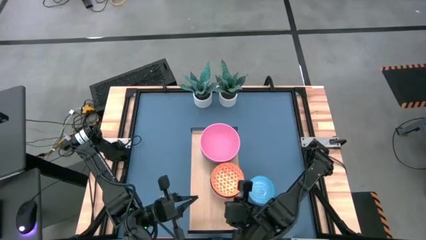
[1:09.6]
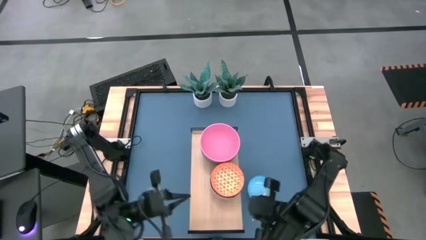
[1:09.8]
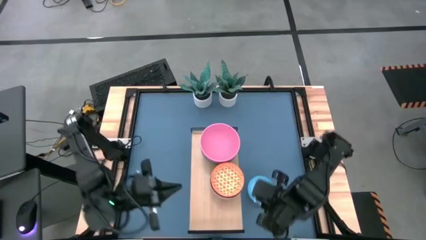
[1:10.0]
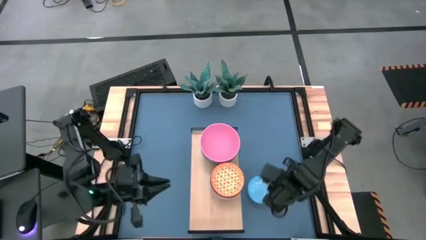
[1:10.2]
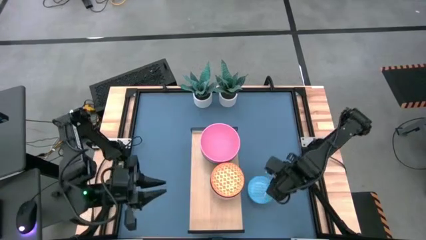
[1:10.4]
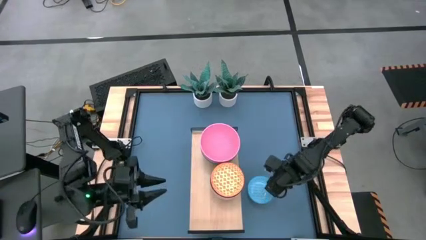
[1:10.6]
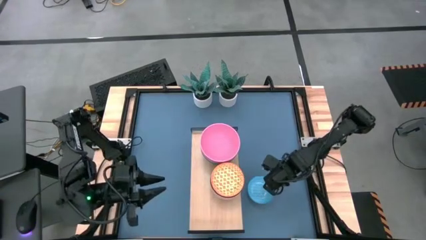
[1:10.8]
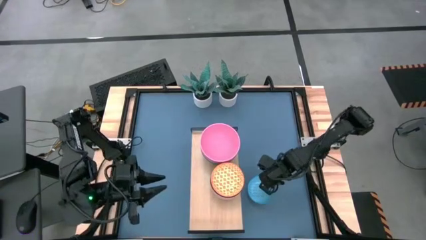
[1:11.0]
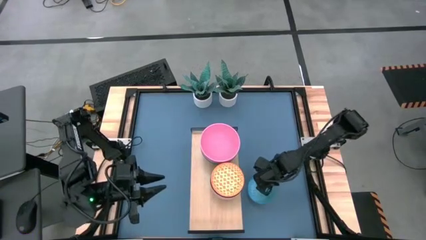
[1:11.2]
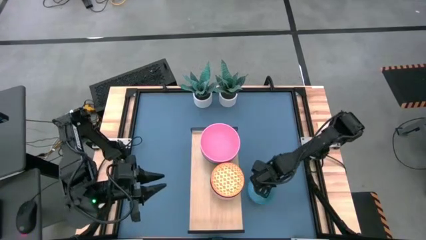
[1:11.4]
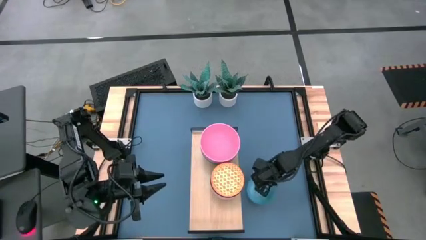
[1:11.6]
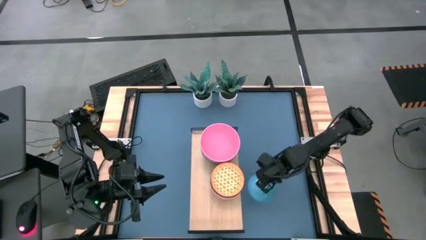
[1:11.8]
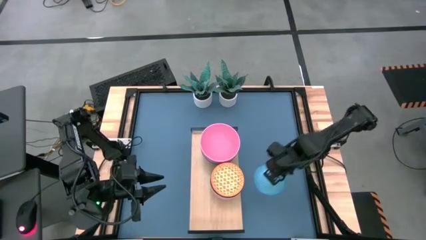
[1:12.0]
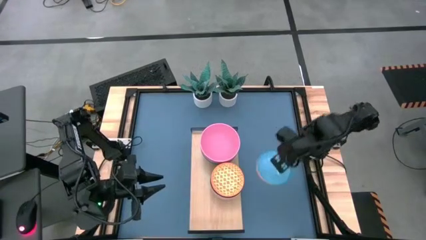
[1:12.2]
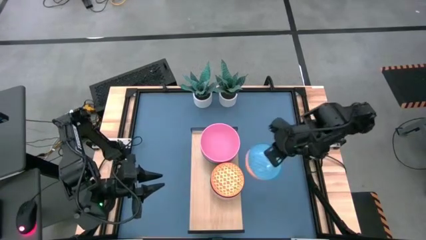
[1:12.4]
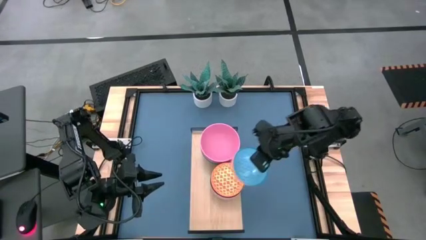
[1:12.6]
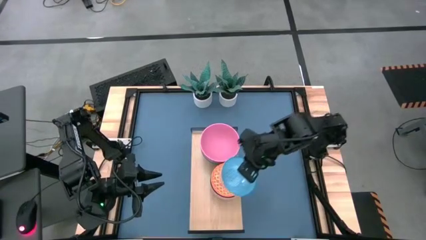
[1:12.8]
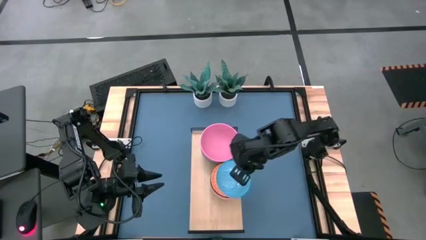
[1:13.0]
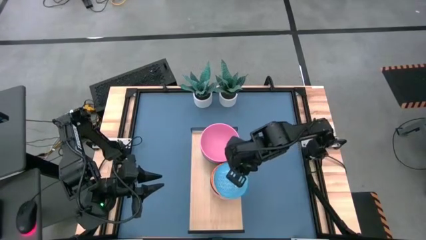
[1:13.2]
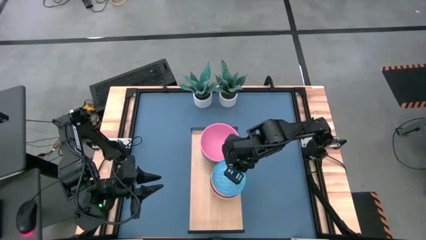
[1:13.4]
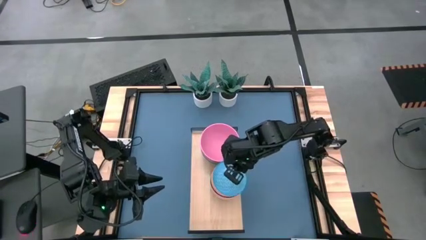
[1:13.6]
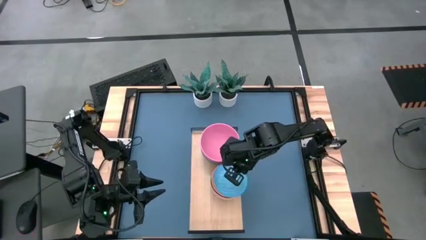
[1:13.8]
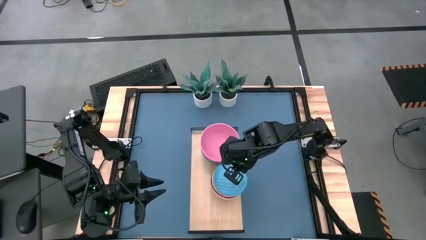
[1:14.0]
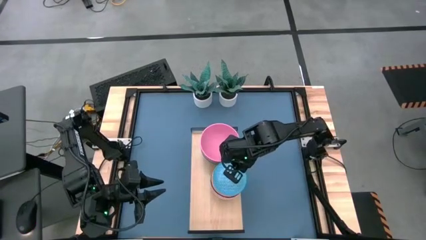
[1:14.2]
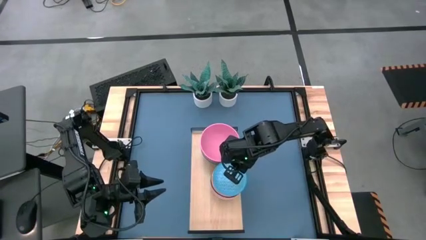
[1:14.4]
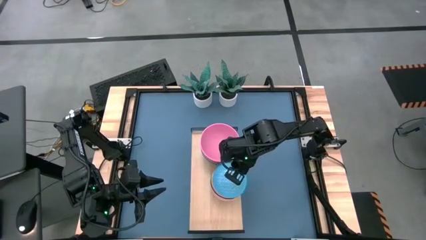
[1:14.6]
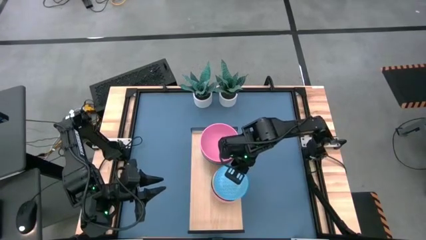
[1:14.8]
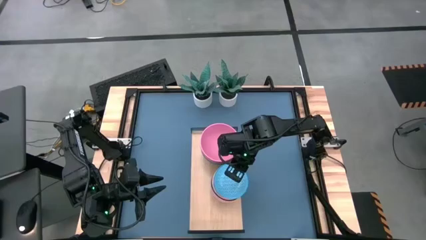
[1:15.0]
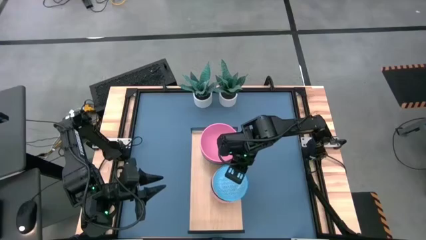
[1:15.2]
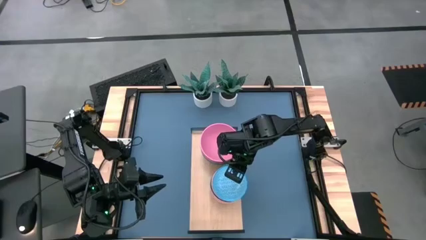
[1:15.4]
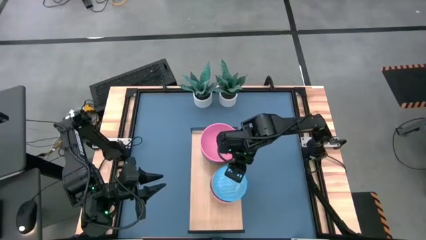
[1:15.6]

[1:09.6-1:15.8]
Task: Place and stack bowls onto a shelf
Stack the light blue patterned bowl on top of the orange patterned bowl on the shelf

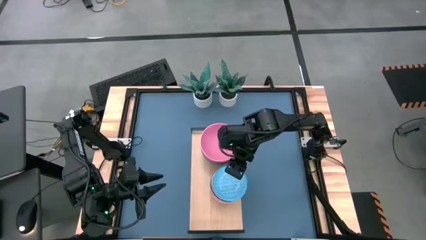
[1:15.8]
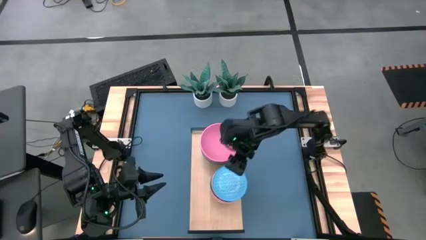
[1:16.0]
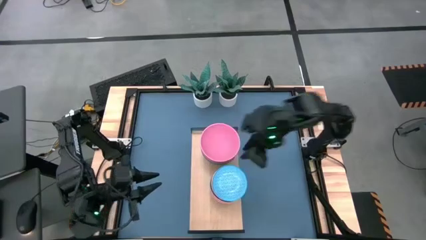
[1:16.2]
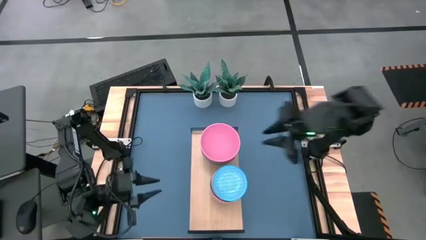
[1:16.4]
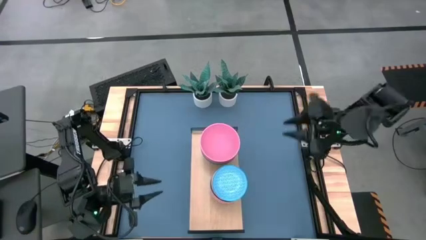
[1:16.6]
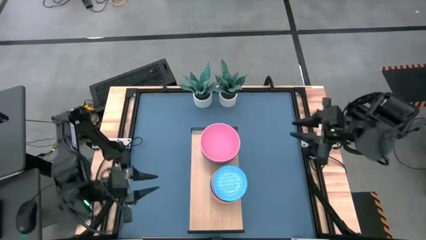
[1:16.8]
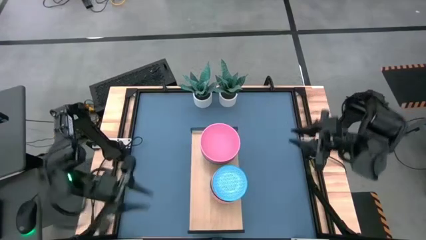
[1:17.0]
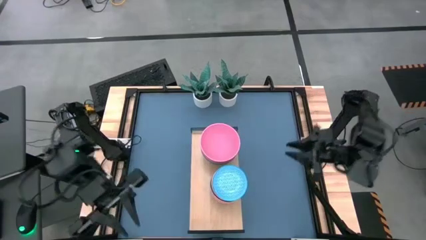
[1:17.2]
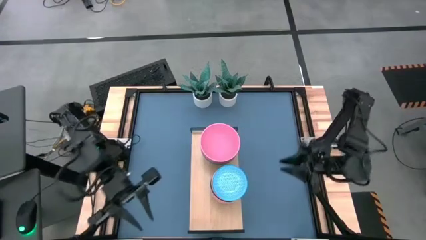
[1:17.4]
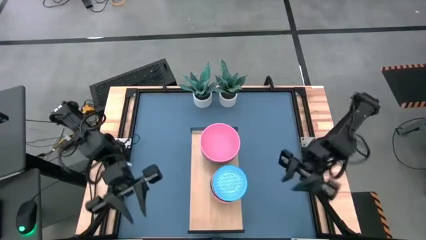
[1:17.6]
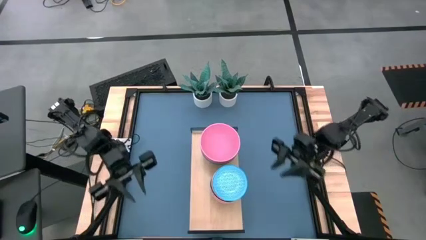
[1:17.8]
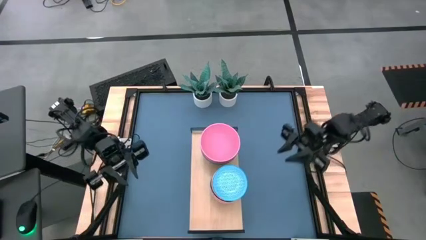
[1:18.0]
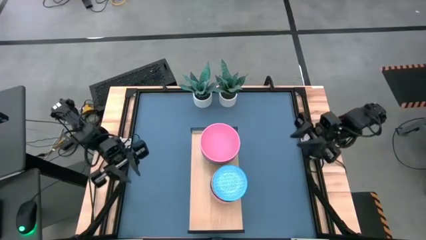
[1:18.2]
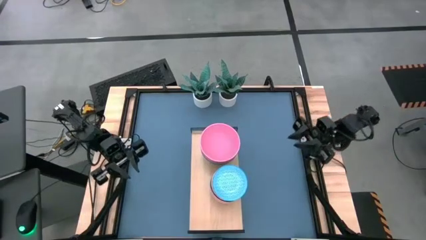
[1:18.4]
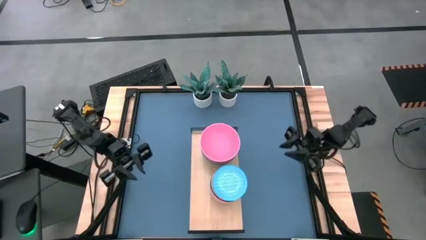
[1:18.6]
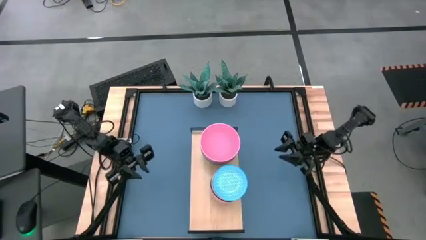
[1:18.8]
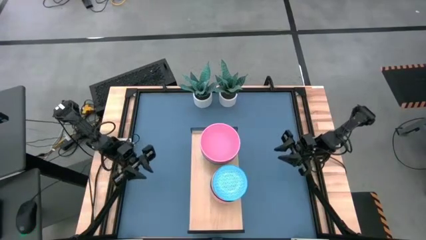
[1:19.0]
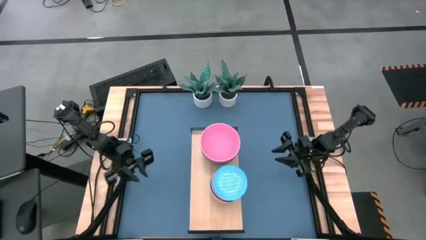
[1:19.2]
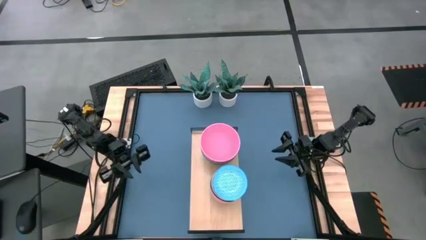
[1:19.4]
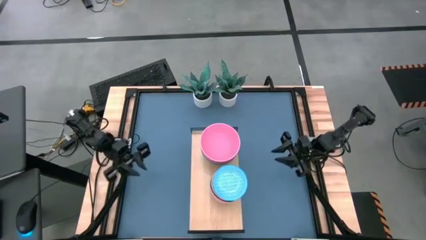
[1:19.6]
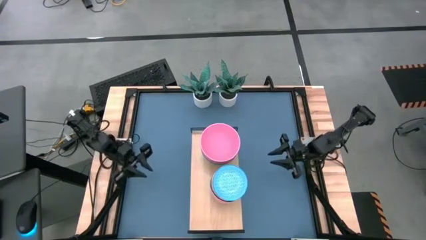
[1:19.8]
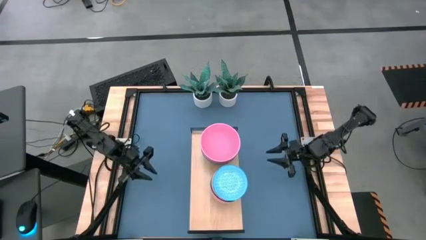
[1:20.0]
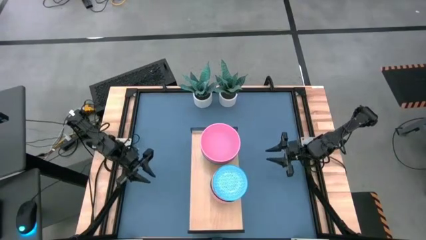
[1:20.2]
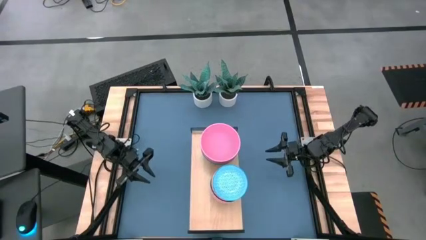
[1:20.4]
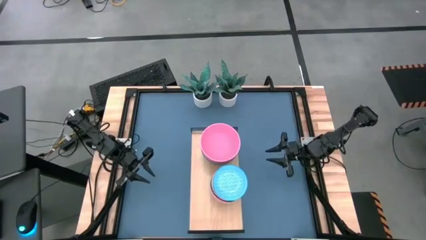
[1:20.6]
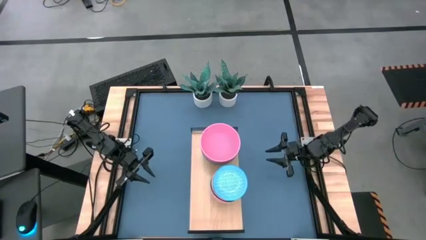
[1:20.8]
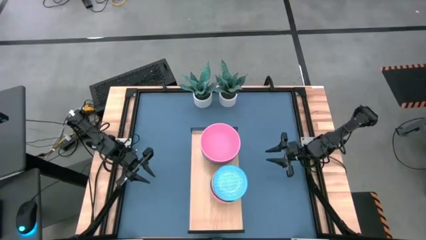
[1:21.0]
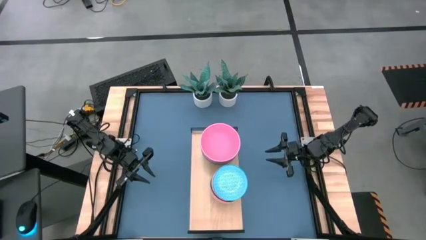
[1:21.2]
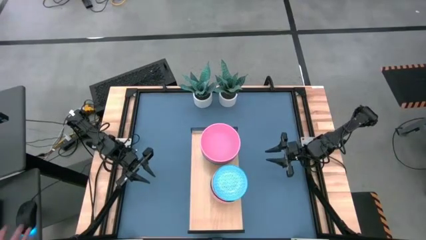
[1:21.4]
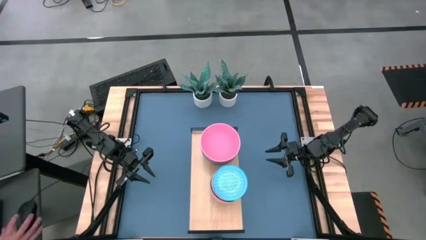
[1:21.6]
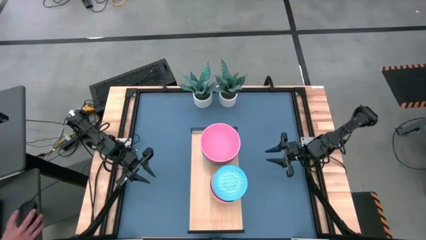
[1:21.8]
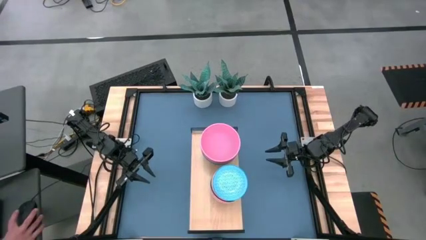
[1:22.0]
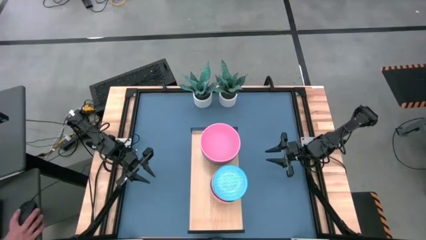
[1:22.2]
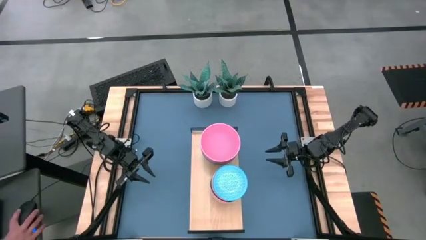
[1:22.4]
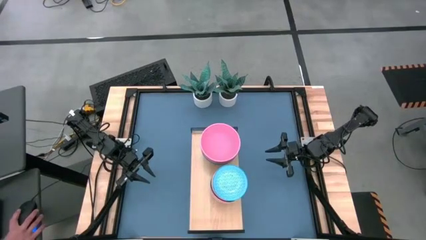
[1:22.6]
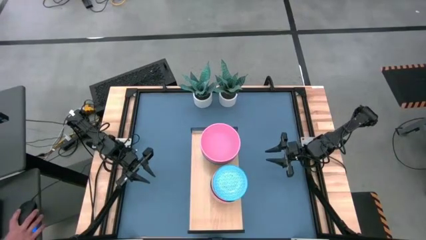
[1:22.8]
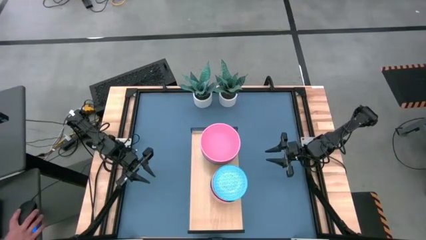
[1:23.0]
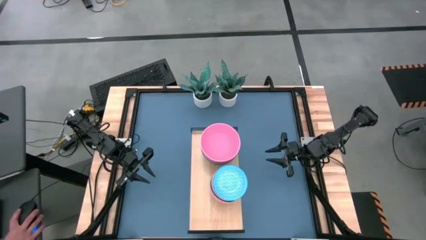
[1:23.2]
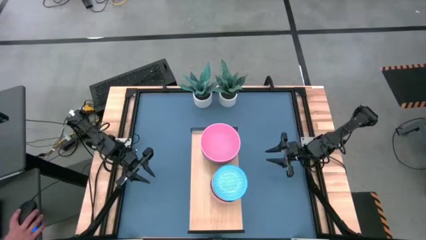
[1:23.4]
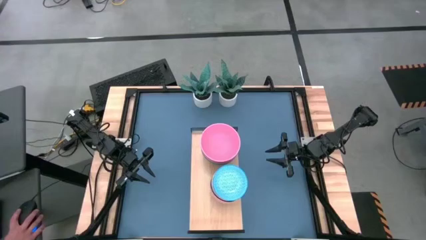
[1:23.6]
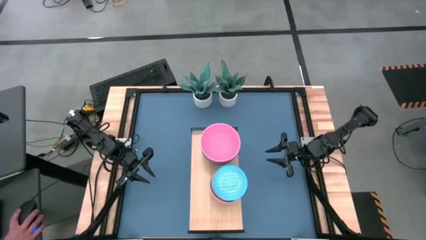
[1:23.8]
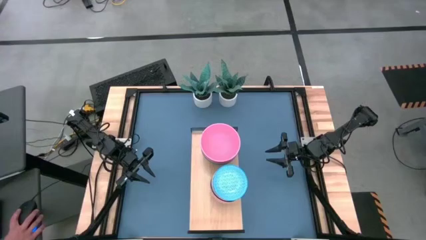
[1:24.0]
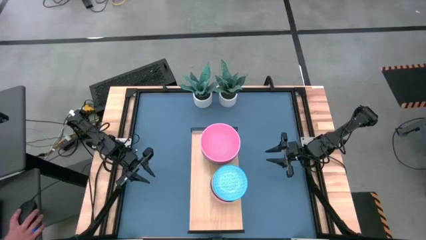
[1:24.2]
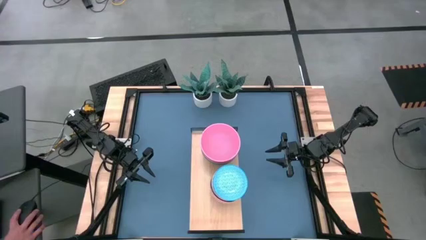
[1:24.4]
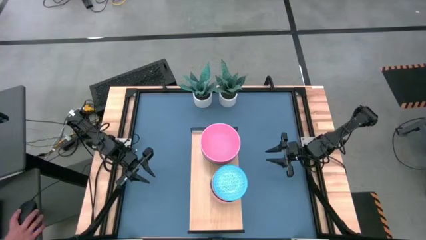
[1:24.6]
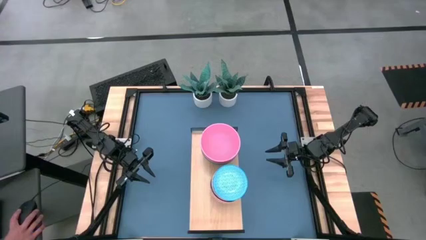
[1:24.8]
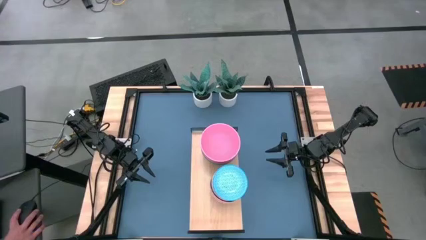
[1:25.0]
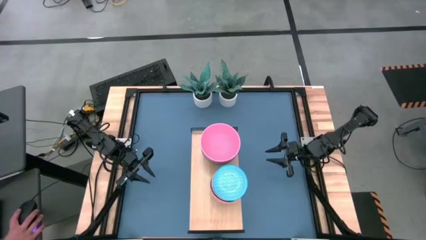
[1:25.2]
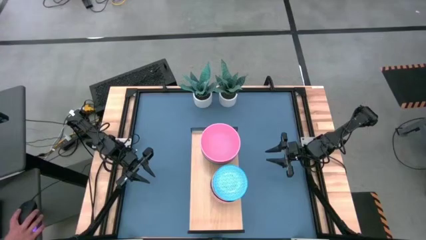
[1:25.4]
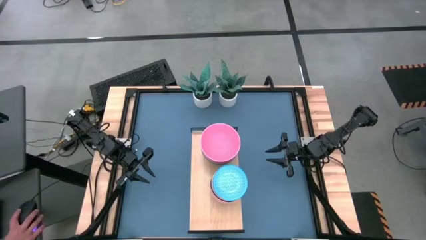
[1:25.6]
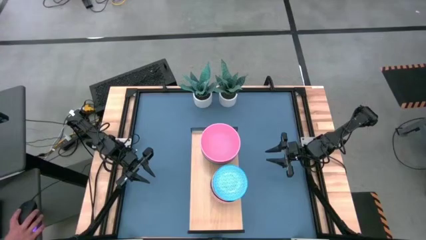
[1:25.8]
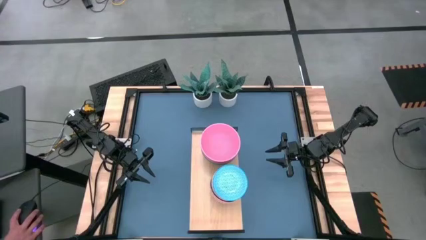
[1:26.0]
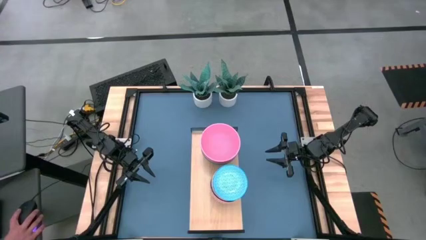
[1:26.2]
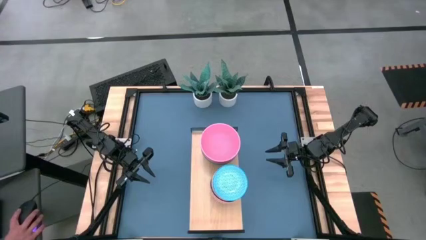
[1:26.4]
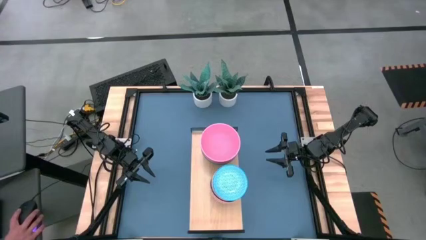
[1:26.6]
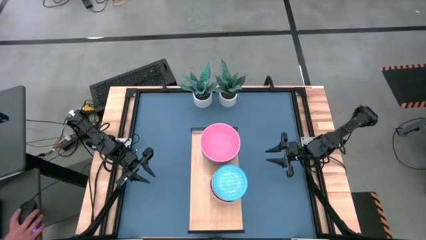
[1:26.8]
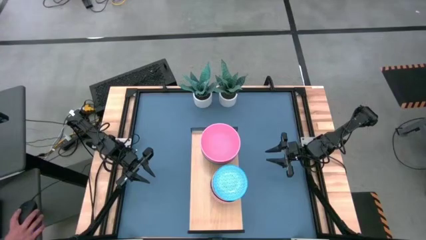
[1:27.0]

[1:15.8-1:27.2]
Return to Home Position
